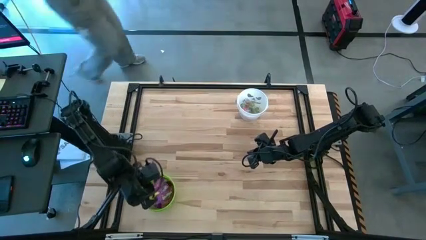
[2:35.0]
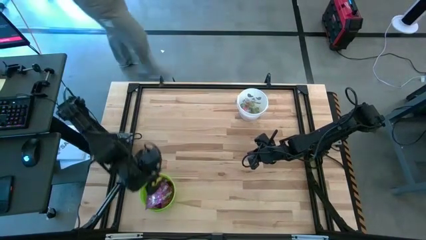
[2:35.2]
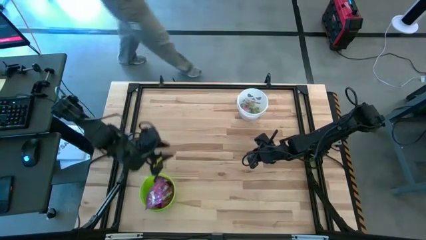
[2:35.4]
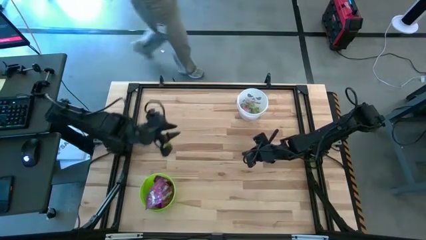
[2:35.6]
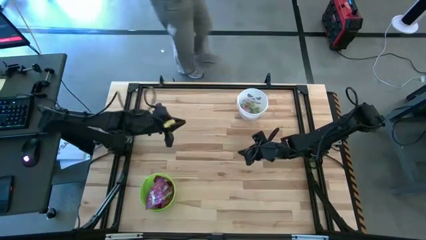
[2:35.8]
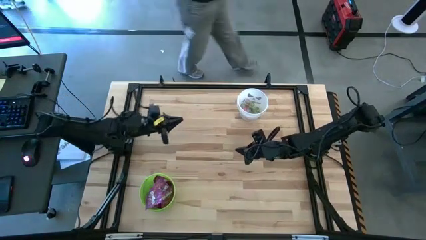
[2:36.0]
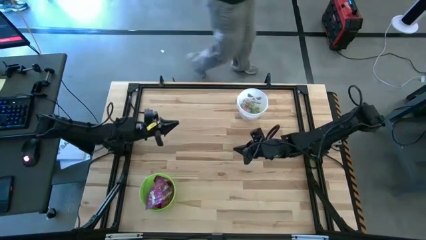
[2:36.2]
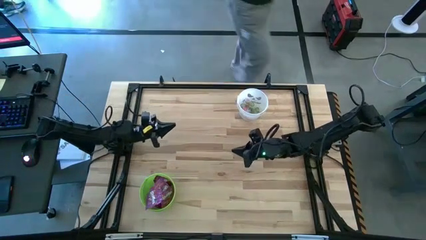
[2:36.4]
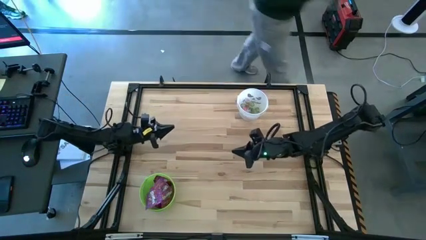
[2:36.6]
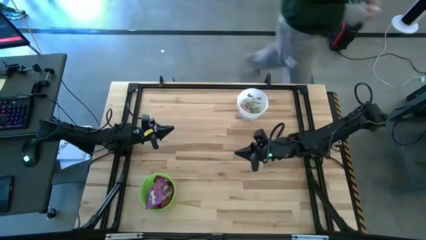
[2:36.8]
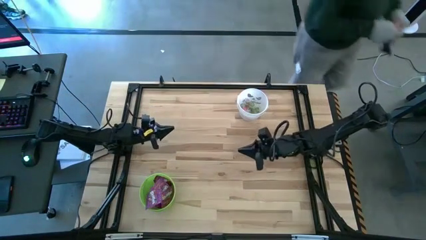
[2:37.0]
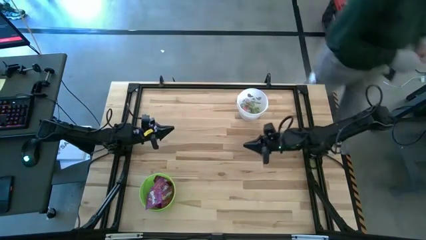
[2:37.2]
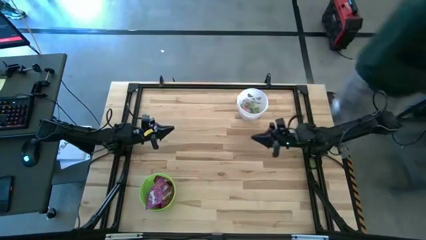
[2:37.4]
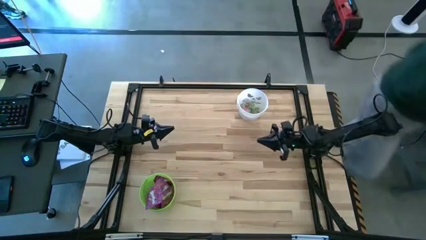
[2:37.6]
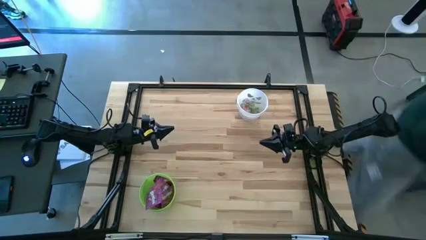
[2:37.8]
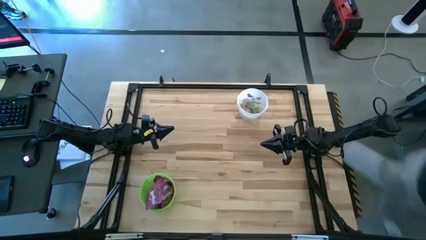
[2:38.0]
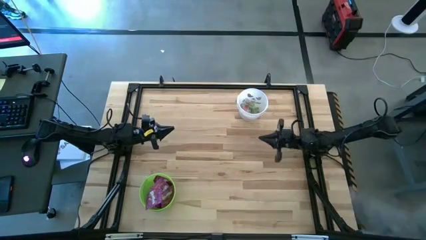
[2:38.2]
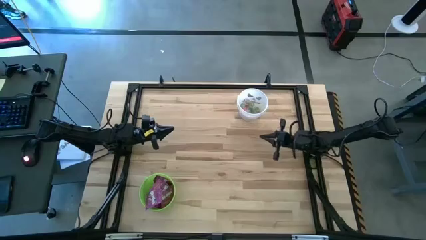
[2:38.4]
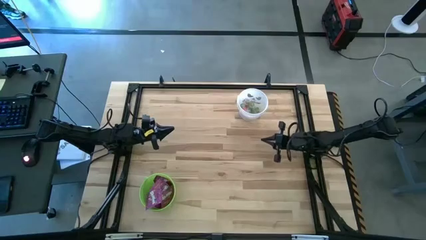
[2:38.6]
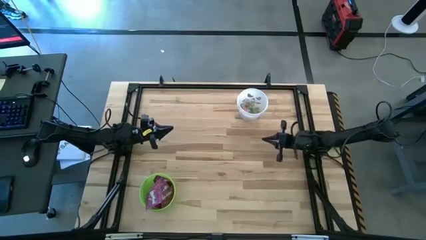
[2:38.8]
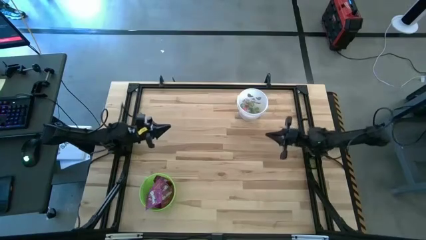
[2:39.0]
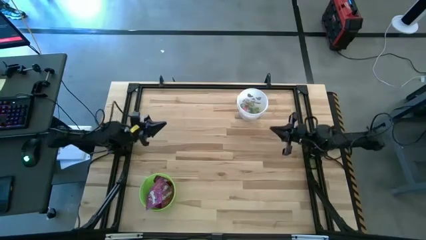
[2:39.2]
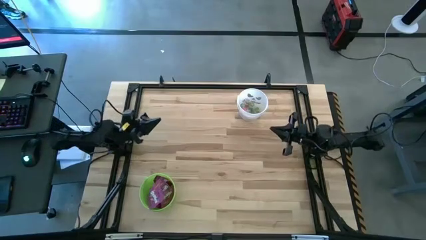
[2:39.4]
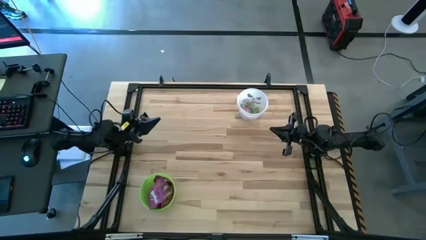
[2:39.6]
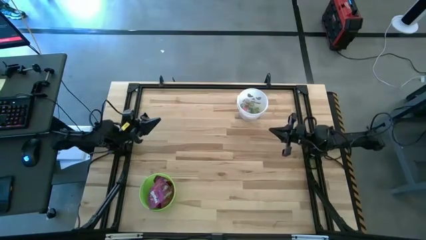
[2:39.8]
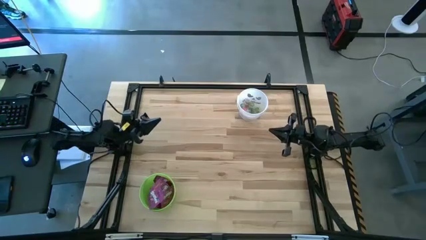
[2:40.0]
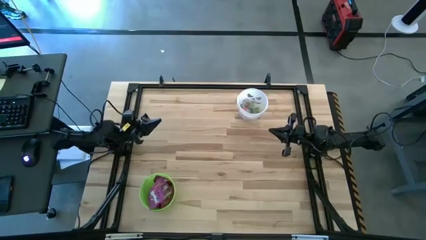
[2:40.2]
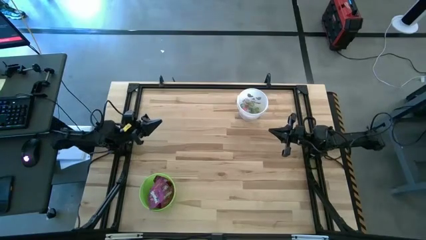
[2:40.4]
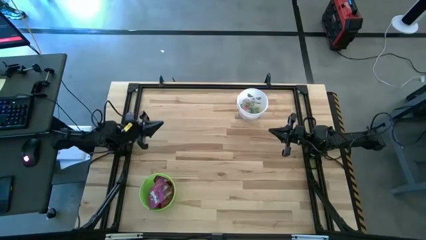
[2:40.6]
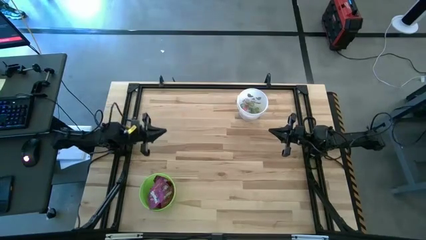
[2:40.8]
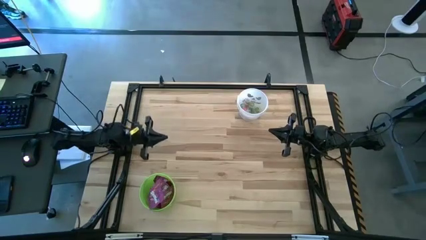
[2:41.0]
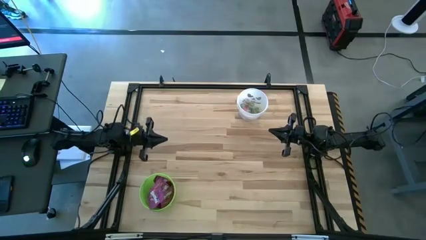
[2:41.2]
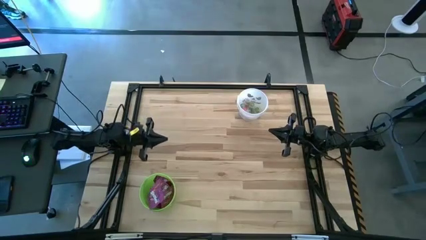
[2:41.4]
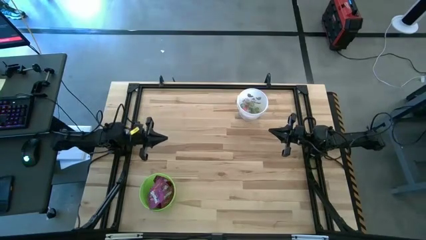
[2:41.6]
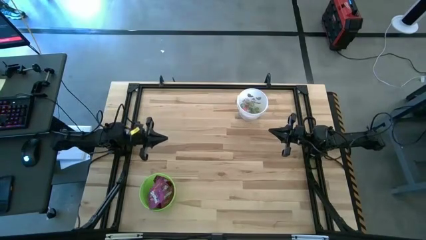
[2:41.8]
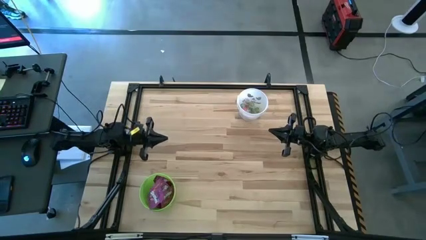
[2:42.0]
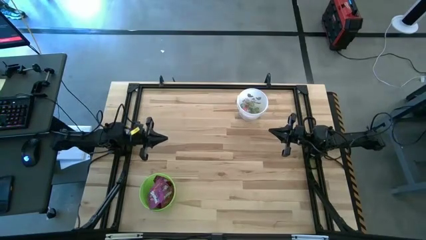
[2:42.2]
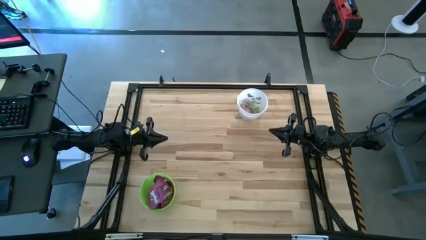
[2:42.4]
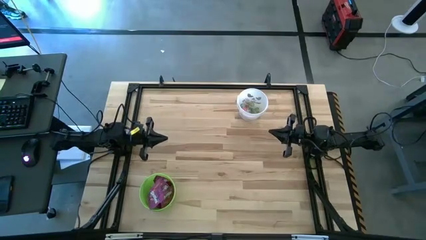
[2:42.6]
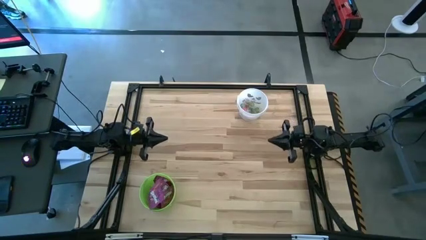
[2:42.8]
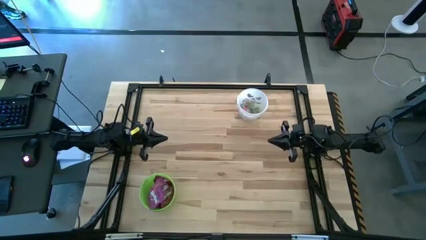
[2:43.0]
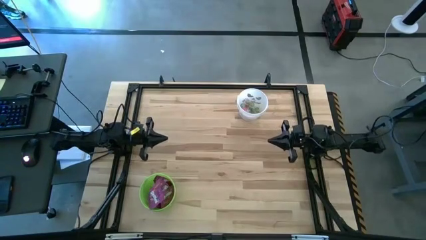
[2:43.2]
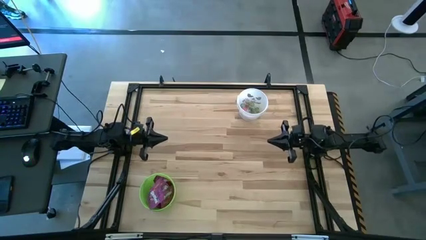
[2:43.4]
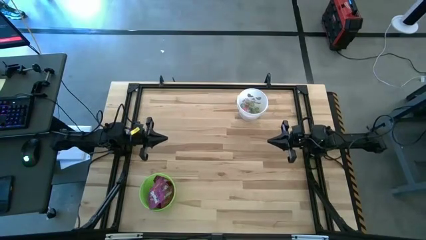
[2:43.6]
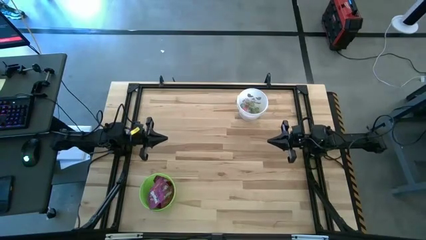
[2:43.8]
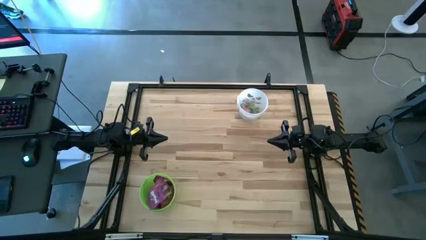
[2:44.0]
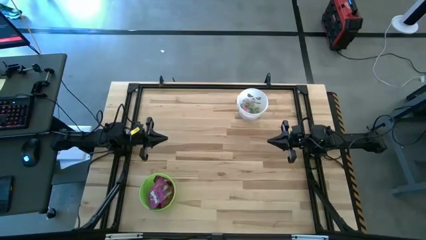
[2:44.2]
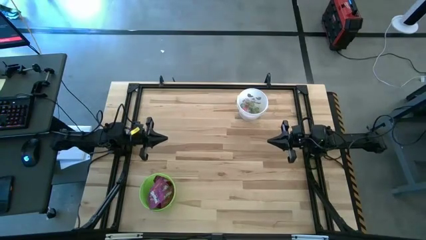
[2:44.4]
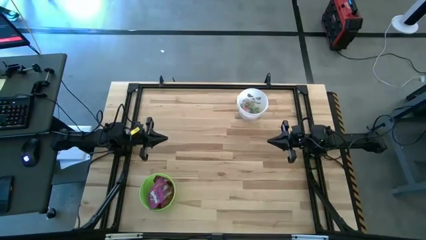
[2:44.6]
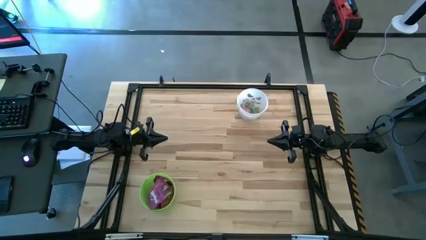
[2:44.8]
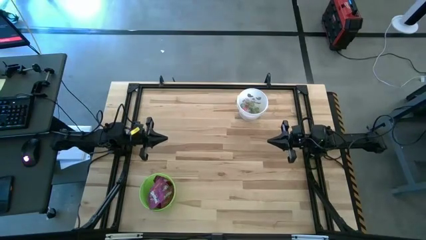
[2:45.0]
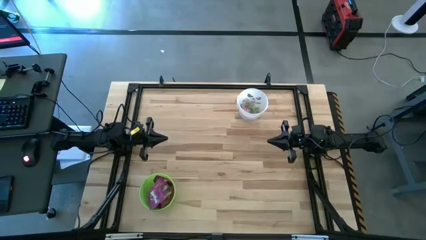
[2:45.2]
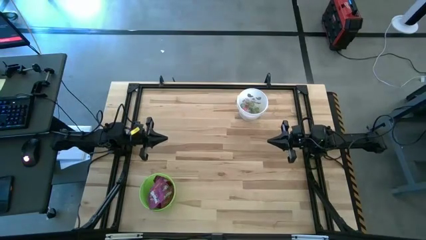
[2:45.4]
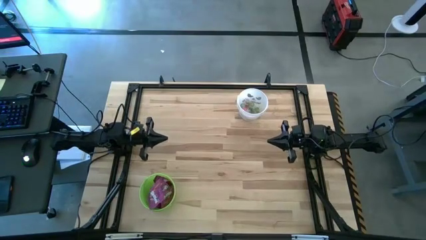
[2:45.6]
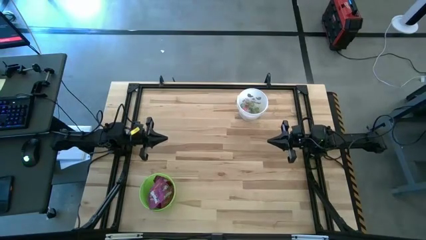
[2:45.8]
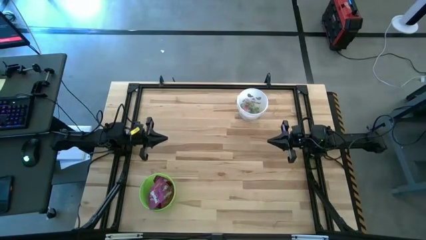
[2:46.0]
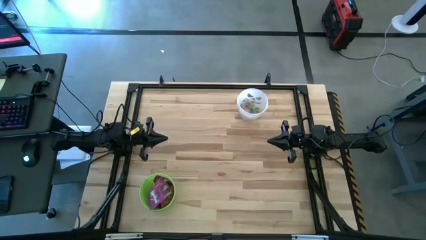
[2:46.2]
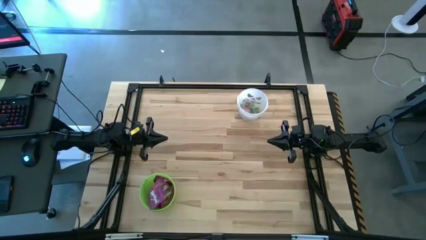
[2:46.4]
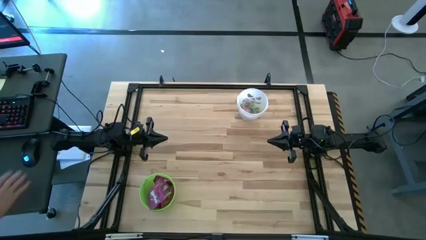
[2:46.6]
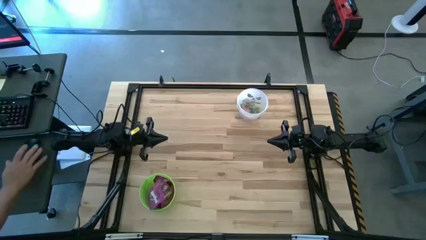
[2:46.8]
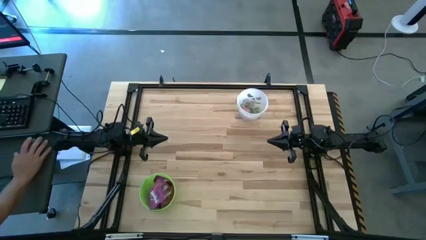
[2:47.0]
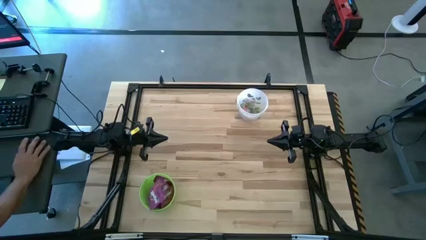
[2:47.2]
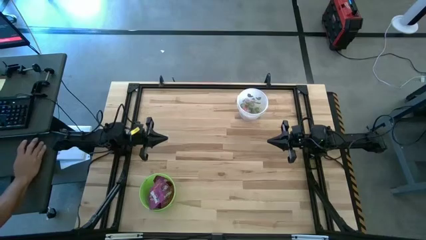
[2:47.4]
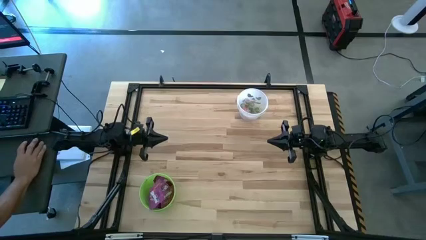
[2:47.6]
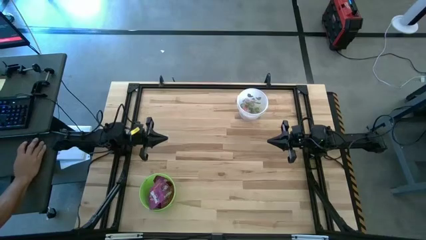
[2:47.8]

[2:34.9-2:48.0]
Task: Sort candy by brand, put in halloween buckets
Return to Home Position
